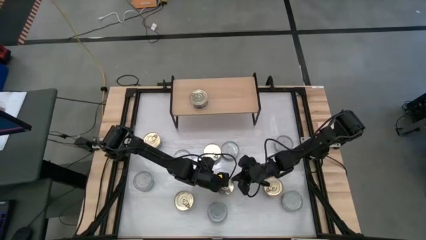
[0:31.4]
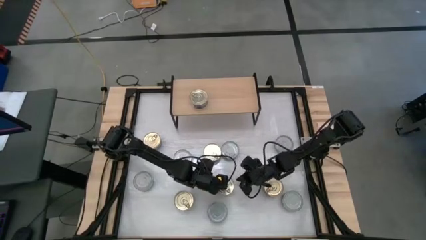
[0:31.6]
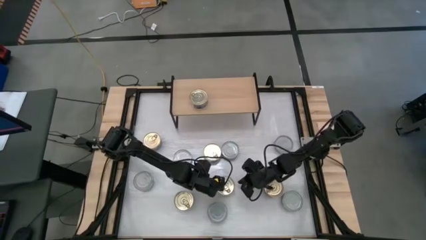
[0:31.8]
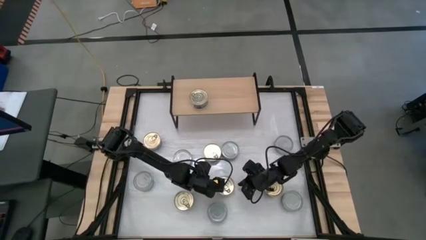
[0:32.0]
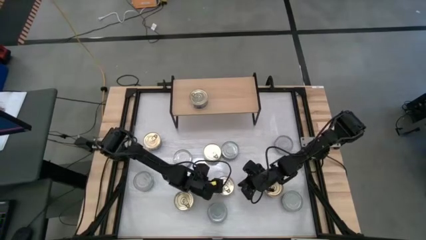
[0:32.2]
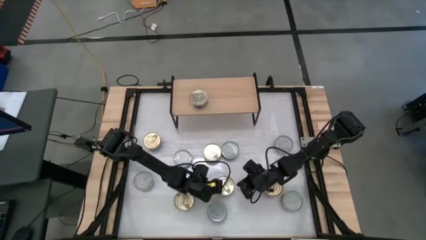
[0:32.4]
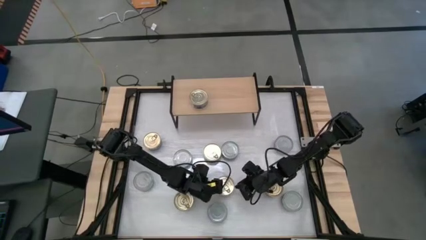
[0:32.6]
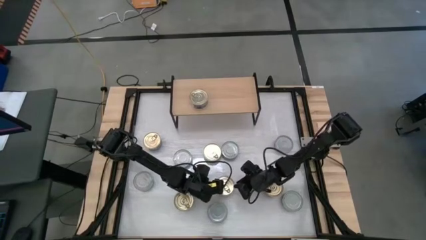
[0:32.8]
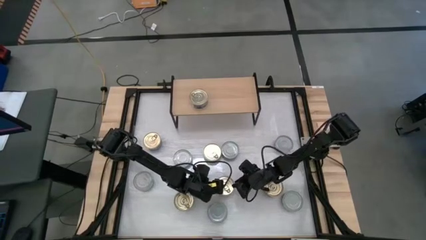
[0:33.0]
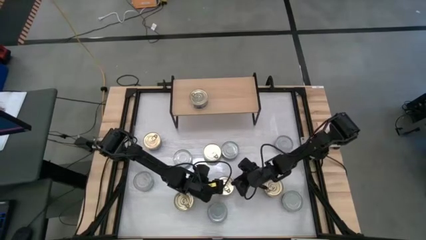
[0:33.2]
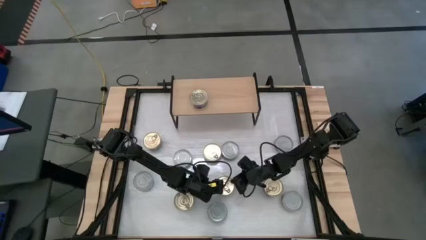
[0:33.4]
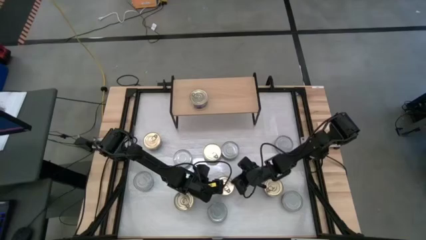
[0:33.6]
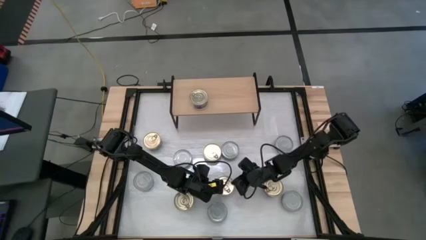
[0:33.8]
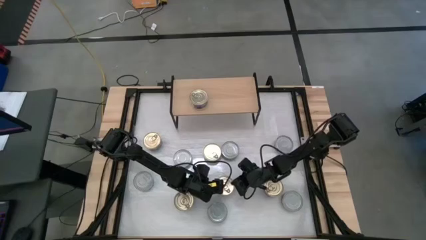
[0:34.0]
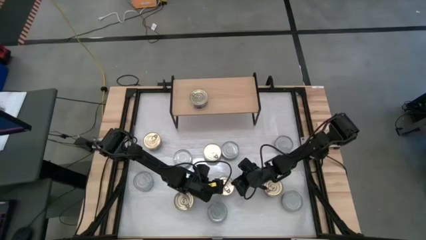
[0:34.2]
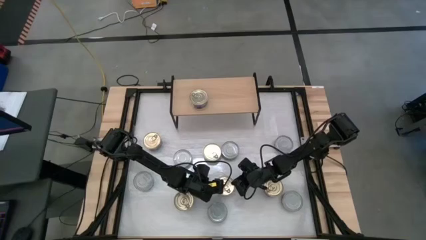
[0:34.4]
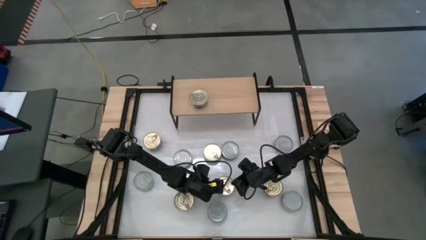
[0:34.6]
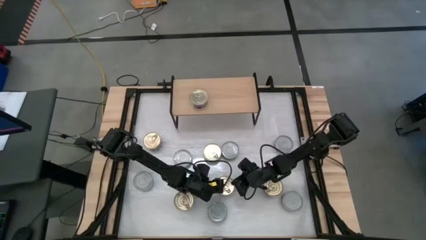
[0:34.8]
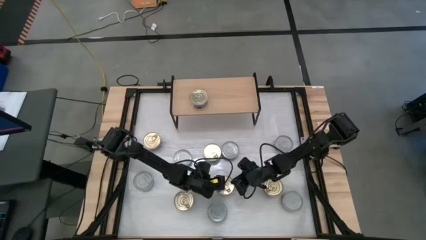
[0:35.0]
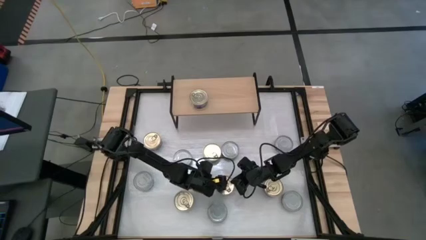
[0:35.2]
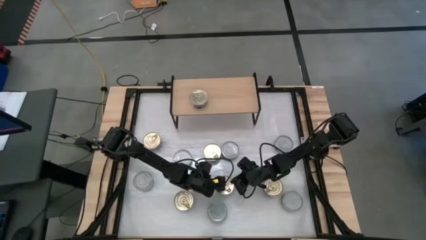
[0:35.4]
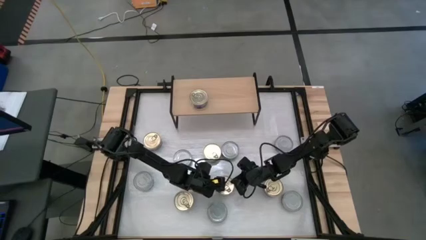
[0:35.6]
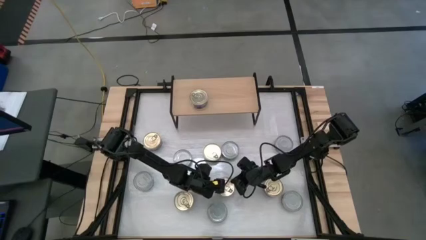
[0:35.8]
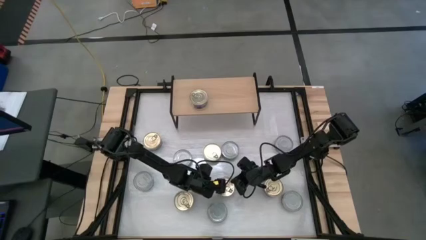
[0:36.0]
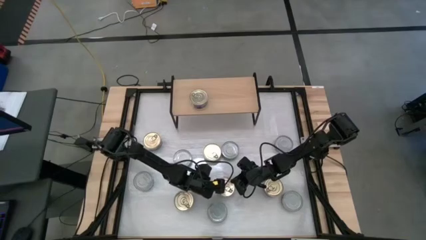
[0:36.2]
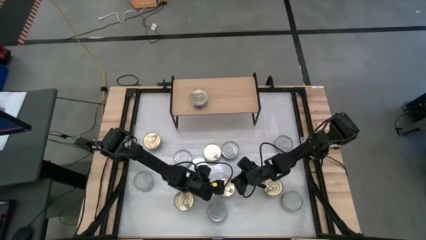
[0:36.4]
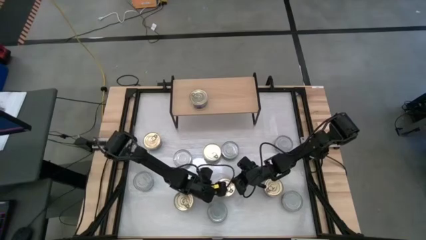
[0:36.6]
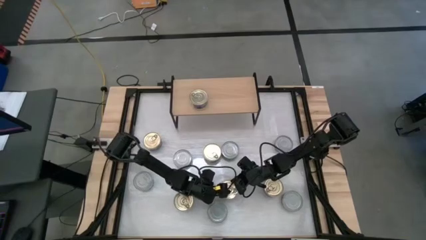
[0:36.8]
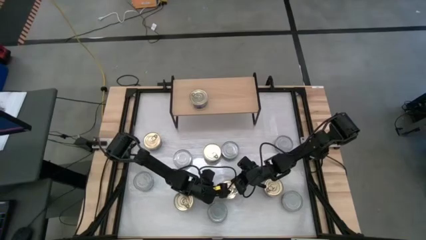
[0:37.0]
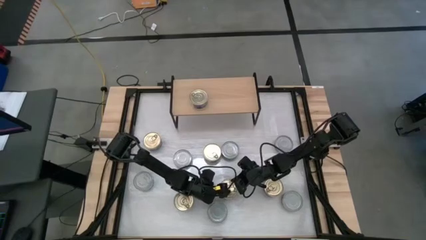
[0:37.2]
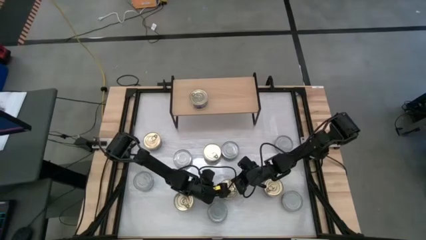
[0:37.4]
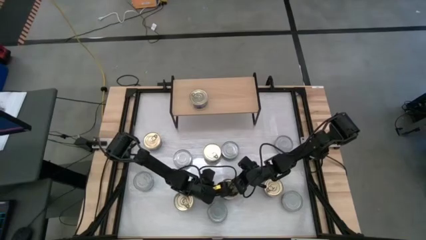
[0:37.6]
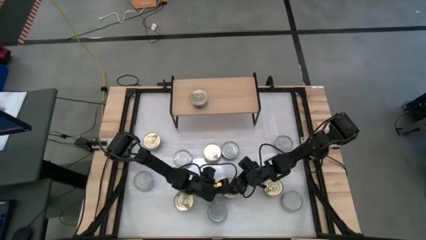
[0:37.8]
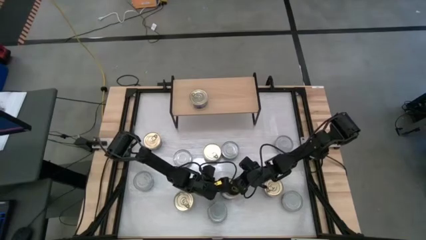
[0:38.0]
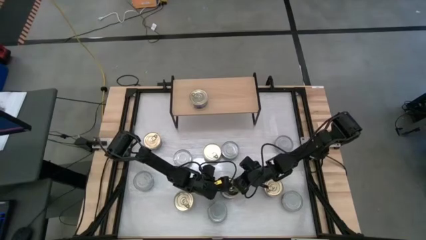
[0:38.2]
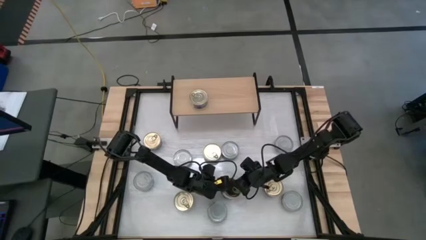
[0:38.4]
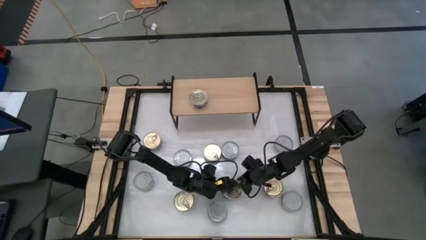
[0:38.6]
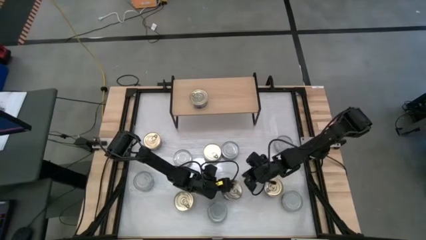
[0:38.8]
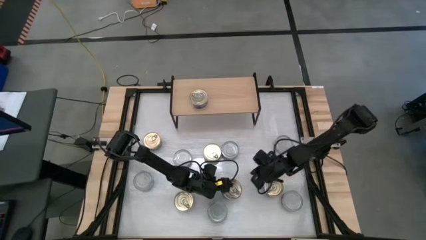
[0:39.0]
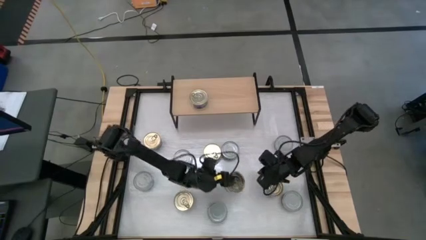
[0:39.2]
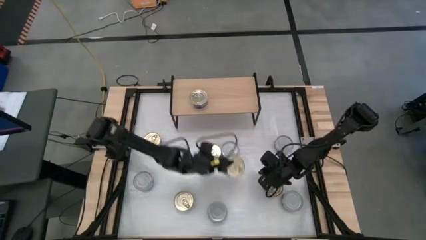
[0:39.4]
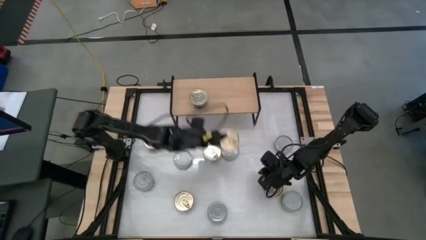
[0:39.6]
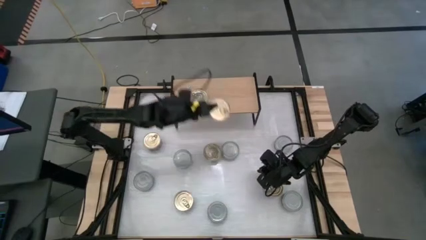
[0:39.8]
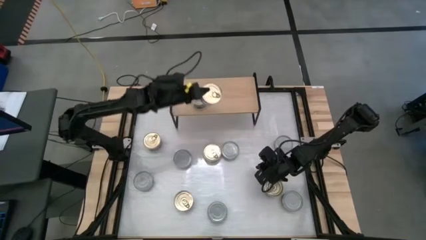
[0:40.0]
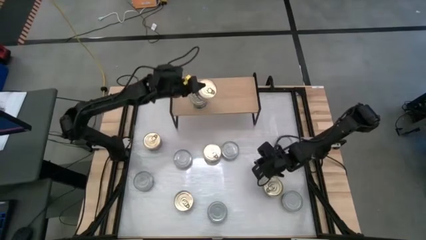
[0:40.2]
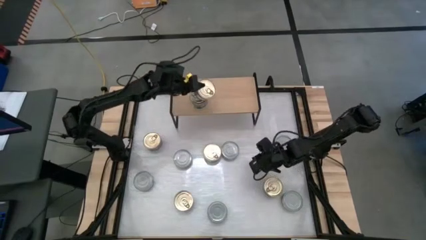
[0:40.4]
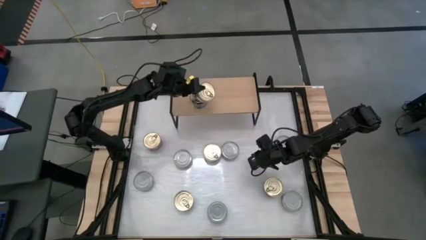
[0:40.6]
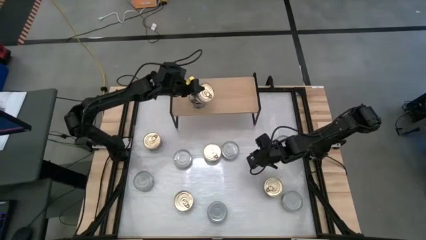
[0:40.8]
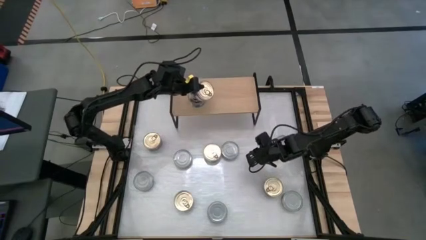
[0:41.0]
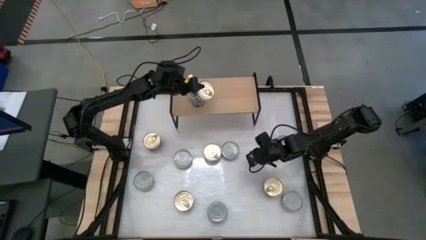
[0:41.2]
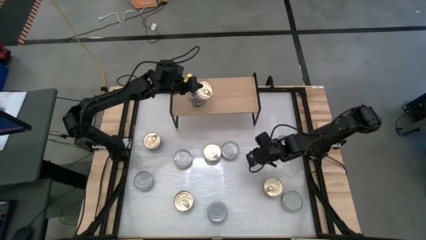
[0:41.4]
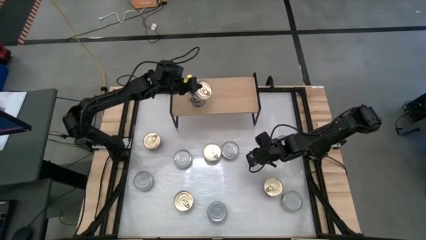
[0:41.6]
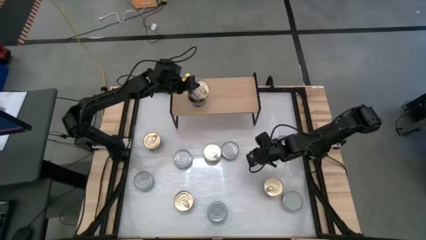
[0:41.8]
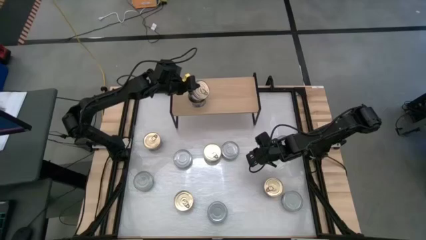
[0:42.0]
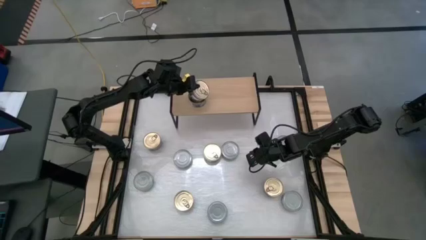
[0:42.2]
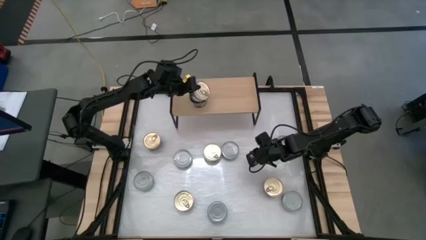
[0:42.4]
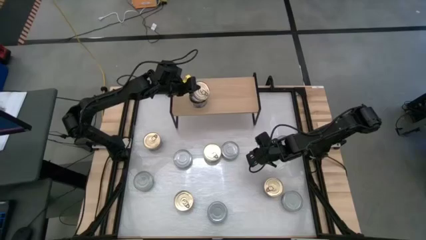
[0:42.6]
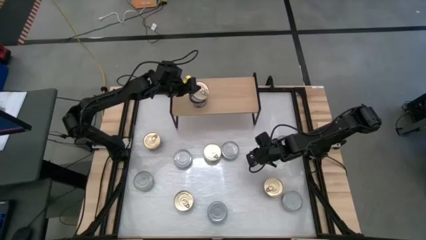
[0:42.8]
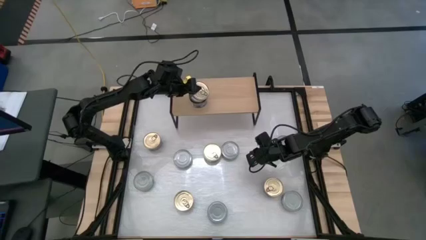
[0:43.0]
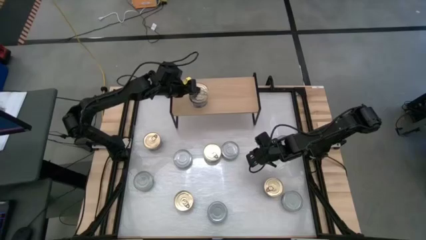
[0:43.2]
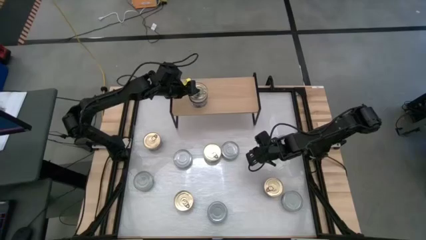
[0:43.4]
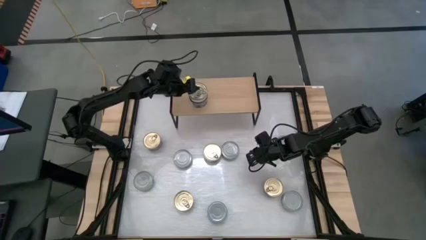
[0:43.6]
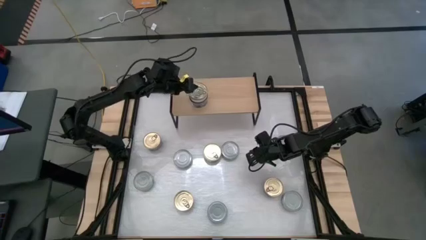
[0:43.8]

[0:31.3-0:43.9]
Task: Stack canned seafood by type on shelf
Stack the blue pink tuna can on top of the other blue pink tuna can on the shelf
